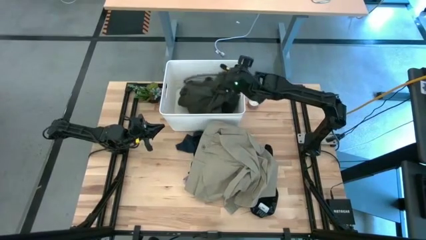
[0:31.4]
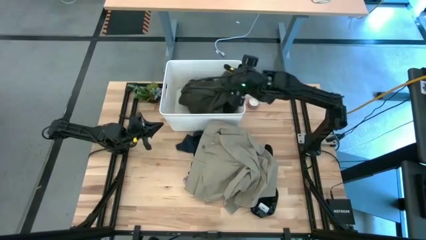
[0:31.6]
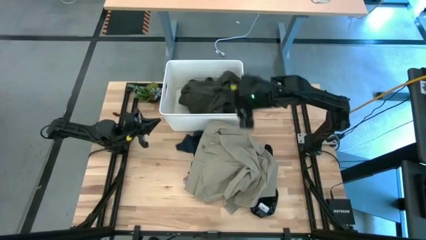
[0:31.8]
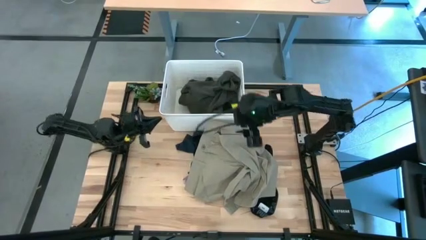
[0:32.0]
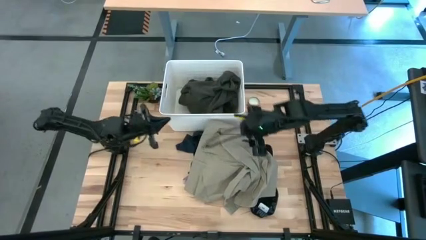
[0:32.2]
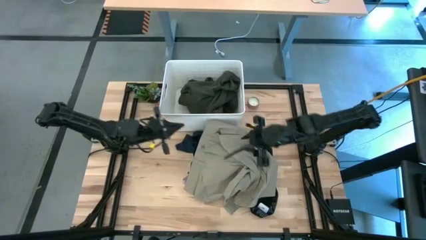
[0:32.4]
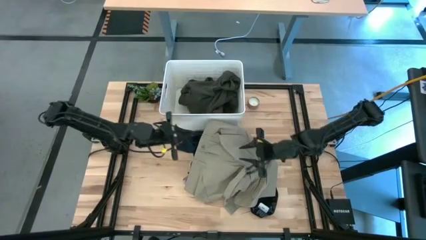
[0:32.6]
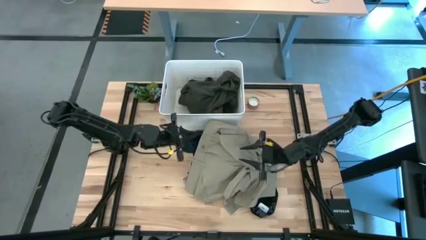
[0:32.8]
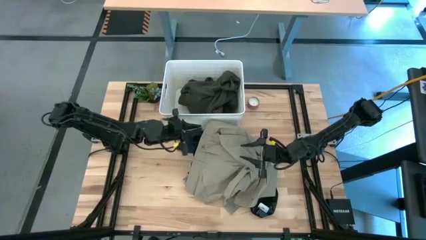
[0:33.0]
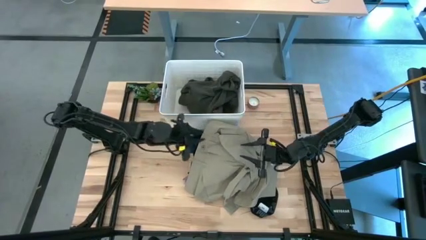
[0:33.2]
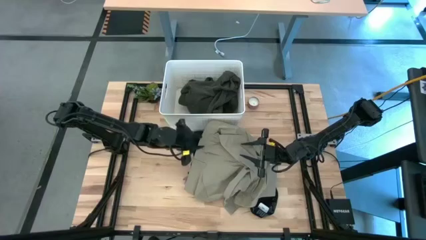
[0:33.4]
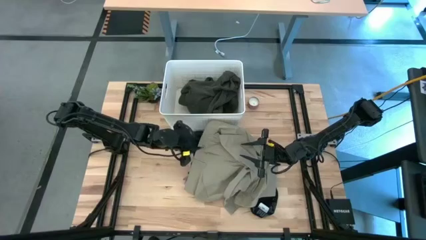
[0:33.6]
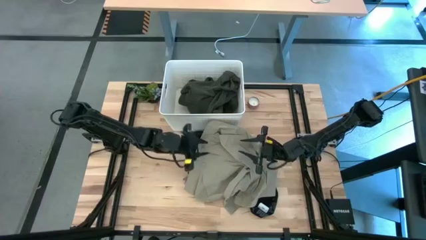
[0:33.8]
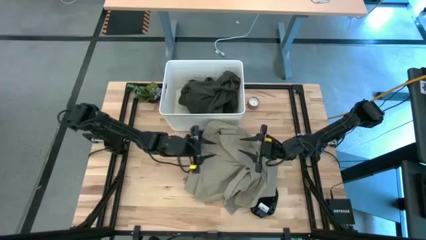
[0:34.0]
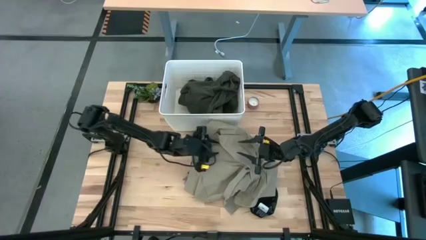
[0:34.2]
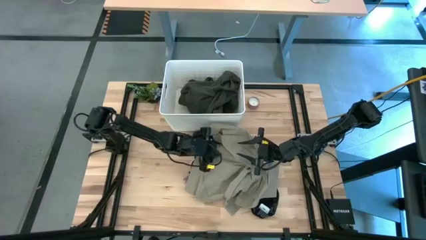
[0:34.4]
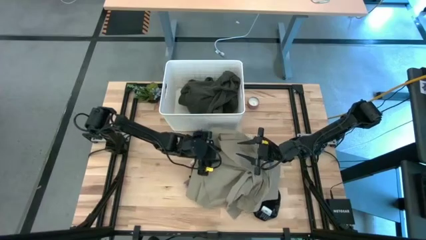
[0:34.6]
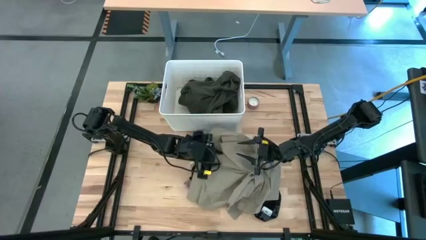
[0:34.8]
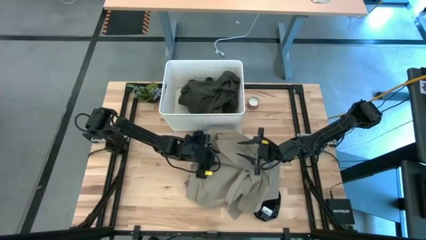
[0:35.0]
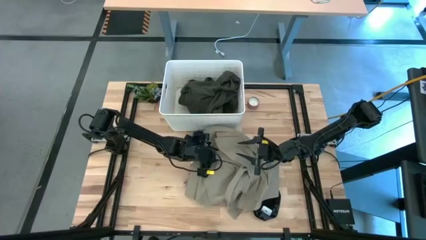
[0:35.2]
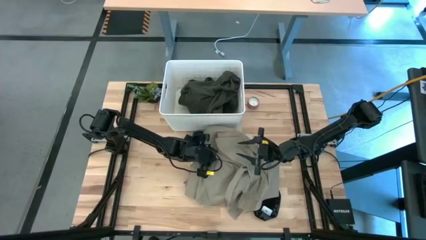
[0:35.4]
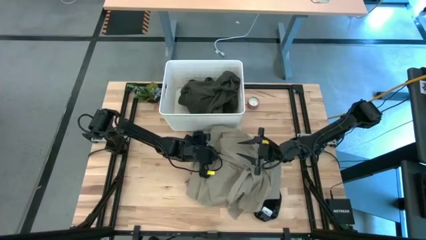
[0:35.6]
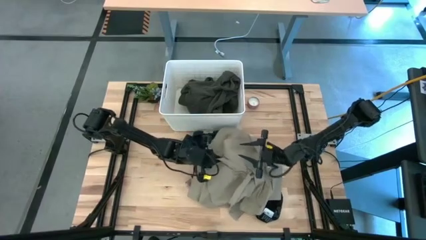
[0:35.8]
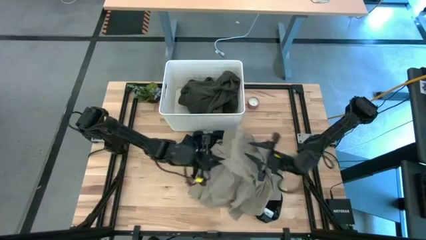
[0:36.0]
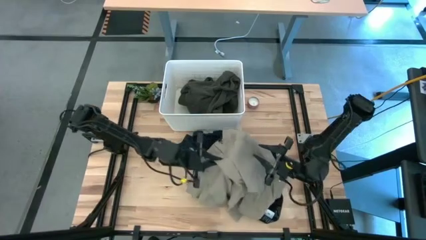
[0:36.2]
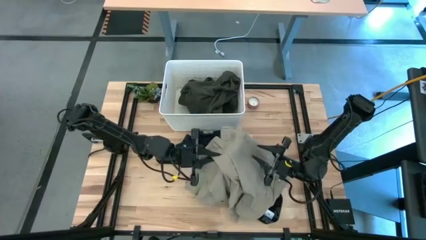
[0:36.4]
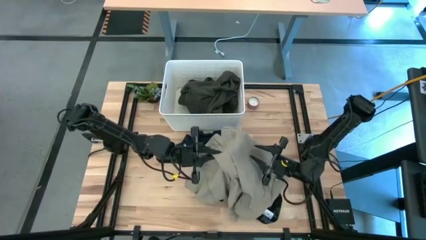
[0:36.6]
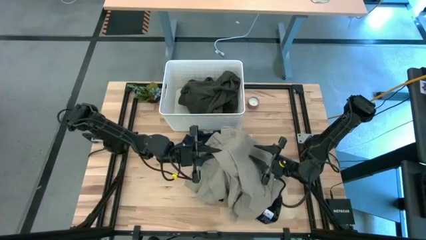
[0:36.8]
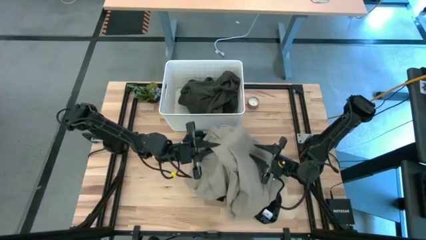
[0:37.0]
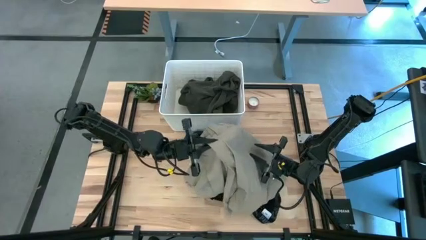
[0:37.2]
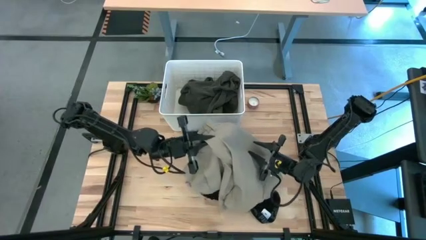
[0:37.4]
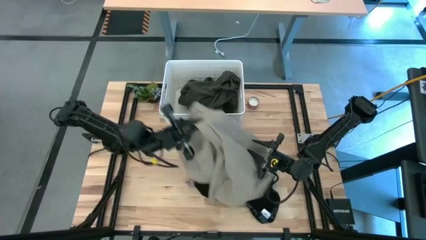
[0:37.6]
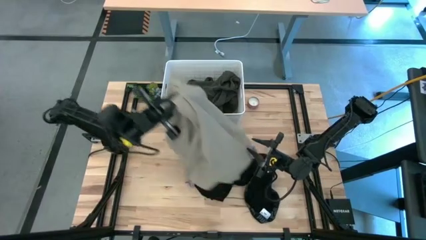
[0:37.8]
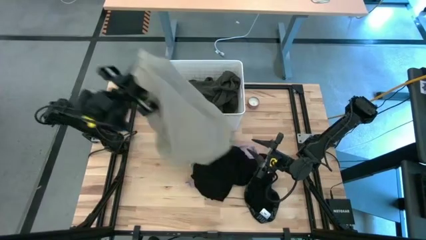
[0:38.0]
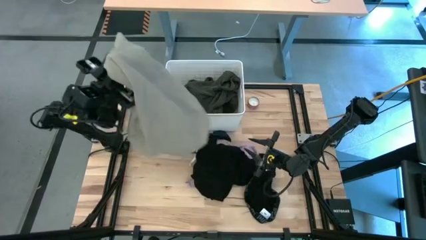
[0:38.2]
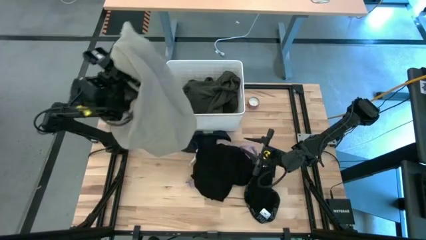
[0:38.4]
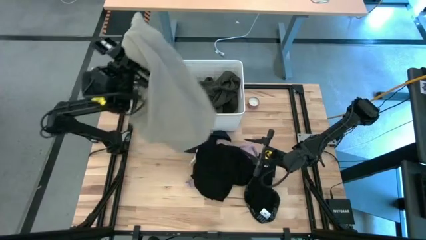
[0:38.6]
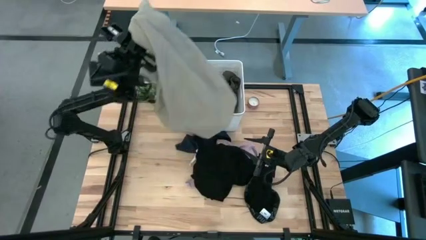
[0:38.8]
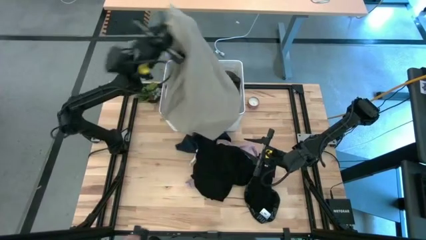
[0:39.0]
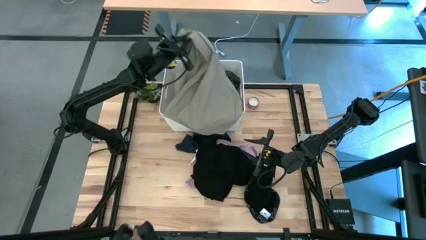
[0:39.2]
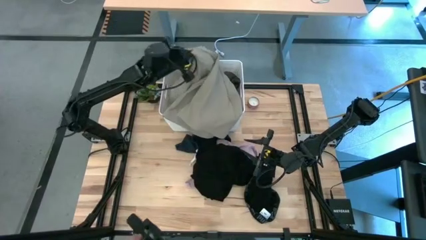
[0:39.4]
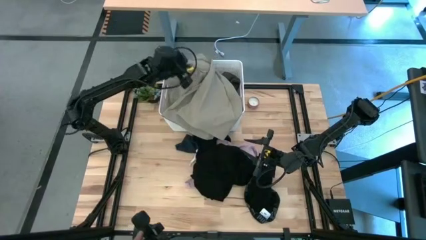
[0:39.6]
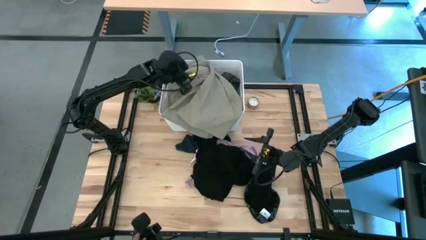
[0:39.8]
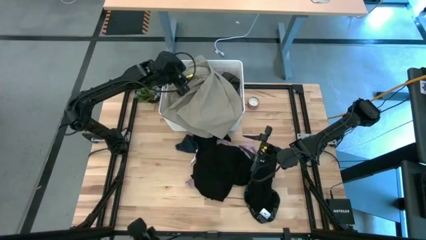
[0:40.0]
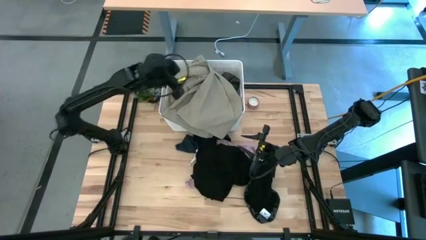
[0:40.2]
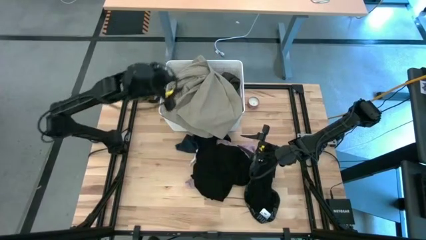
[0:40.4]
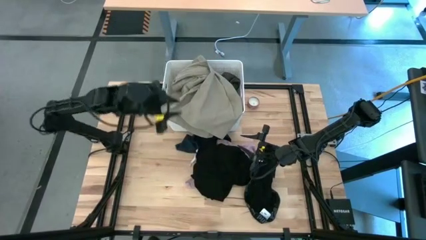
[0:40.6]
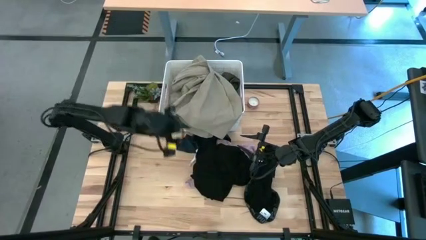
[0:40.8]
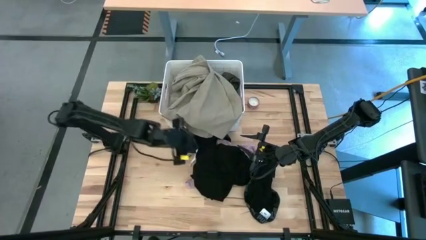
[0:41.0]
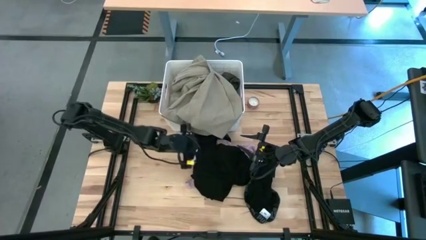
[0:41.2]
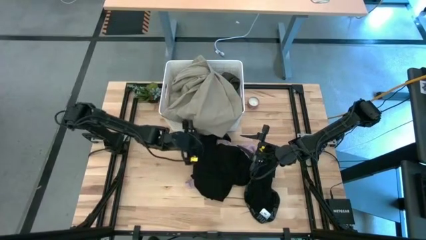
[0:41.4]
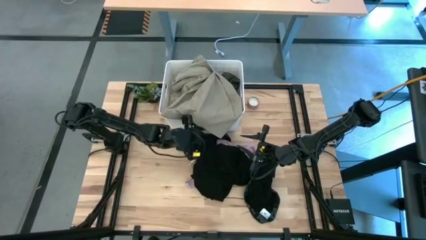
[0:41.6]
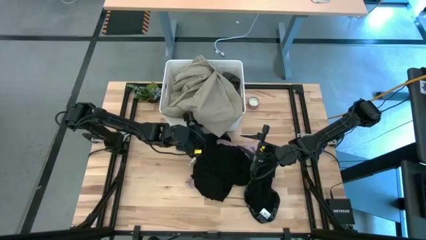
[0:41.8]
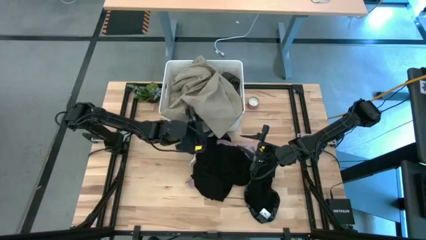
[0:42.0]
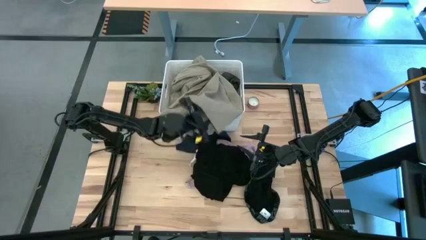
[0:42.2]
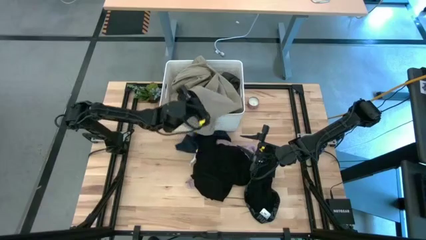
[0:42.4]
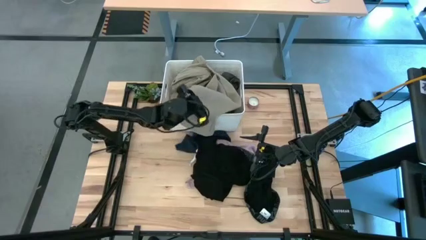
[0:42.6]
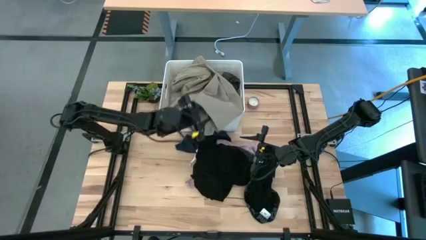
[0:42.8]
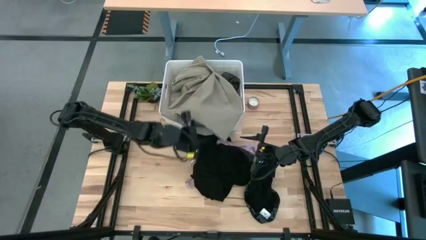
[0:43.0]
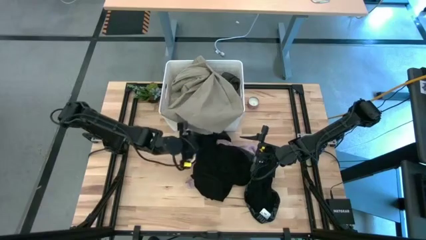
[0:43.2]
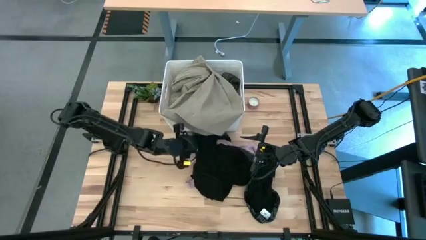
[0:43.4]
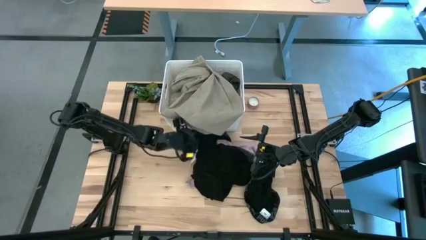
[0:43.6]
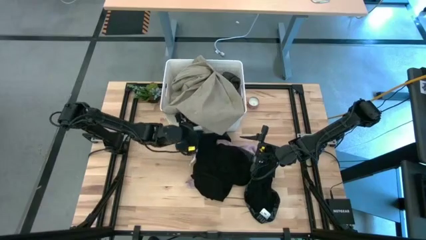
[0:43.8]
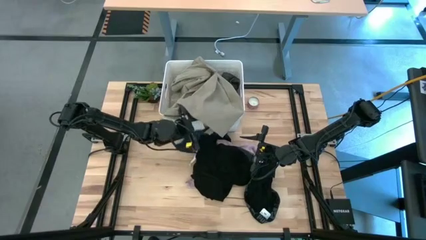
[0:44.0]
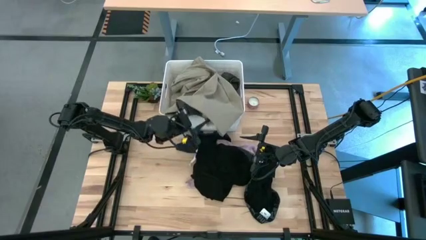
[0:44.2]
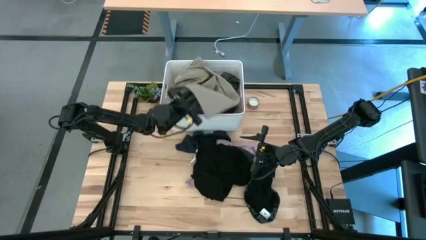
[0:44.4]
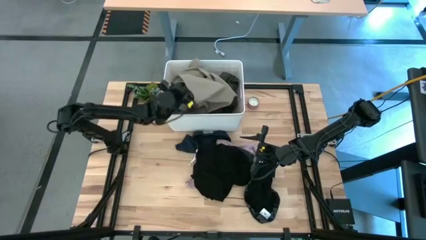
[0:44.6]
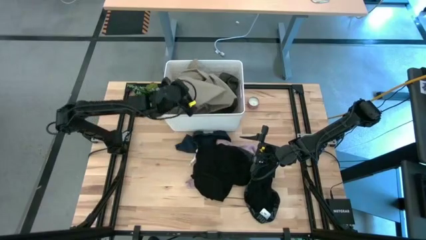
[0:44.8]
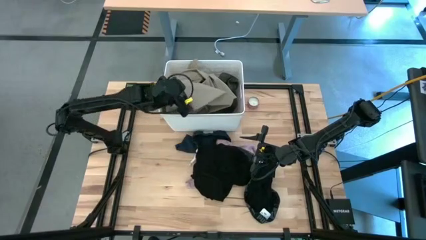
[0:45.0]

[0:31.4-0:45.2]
Task: Sort clothes
Put the brown short into the white bin
